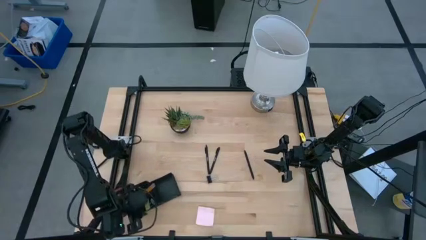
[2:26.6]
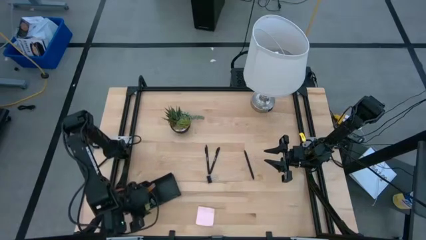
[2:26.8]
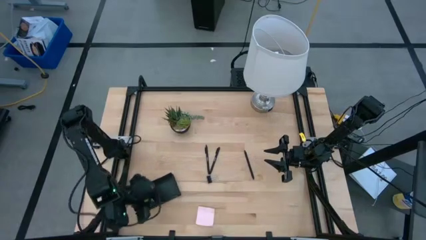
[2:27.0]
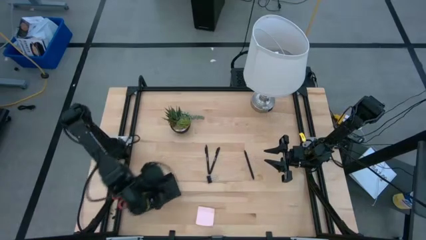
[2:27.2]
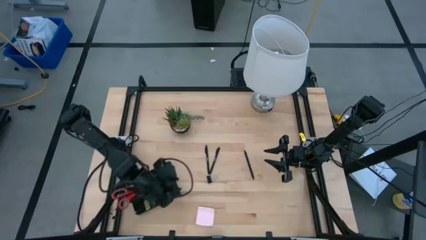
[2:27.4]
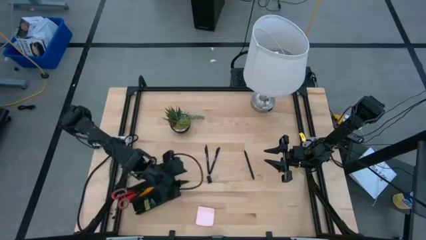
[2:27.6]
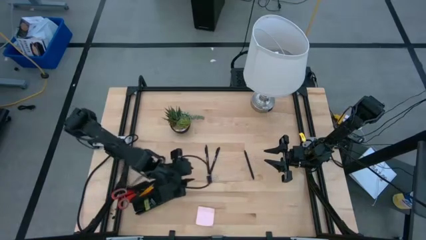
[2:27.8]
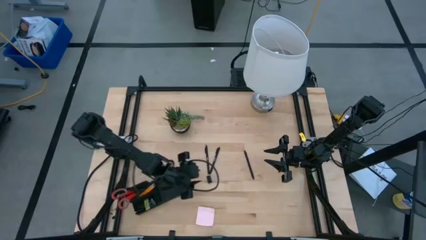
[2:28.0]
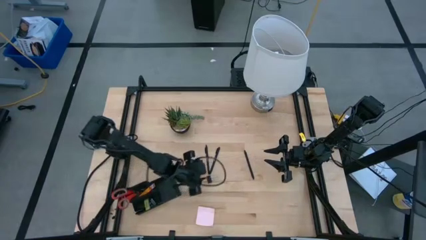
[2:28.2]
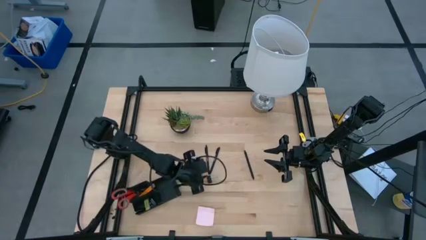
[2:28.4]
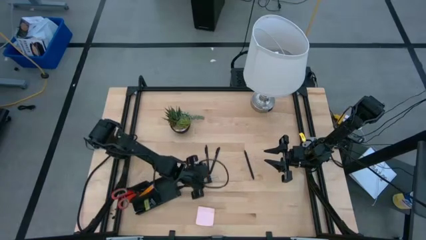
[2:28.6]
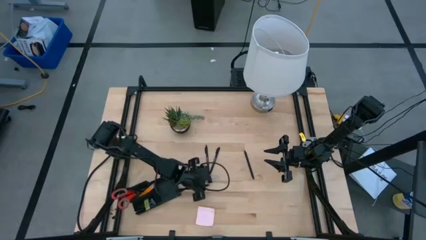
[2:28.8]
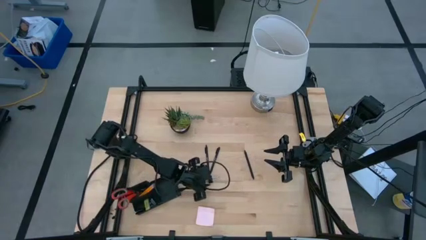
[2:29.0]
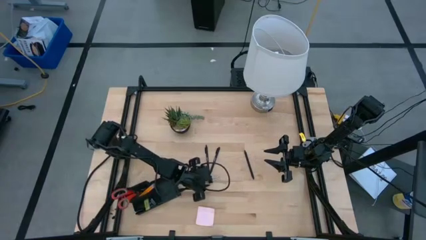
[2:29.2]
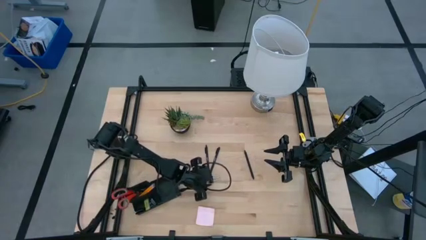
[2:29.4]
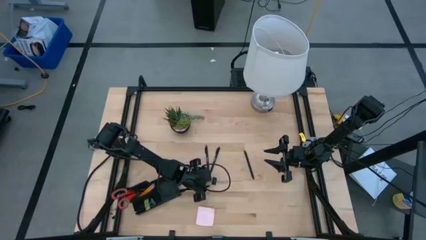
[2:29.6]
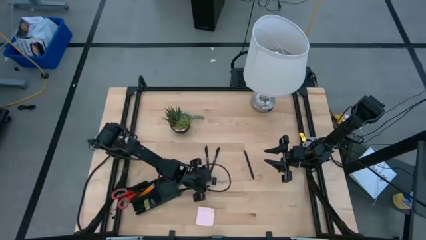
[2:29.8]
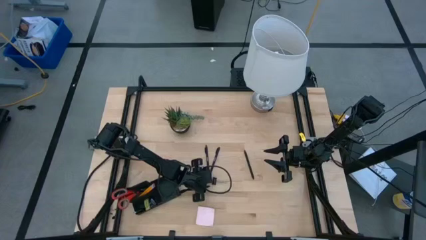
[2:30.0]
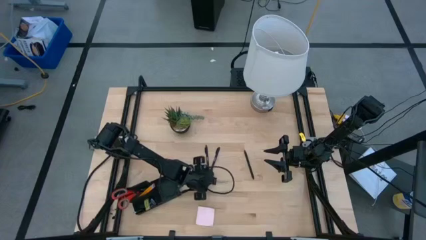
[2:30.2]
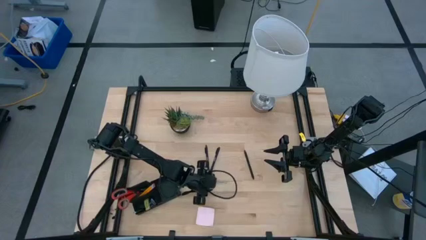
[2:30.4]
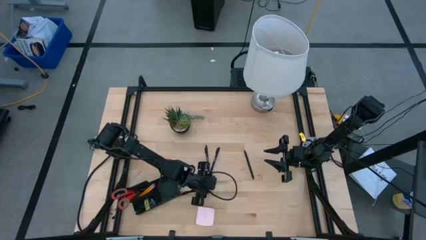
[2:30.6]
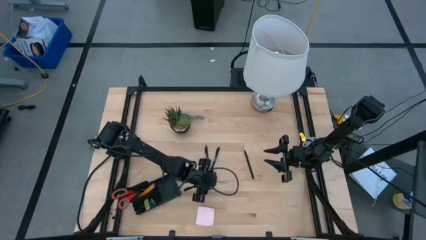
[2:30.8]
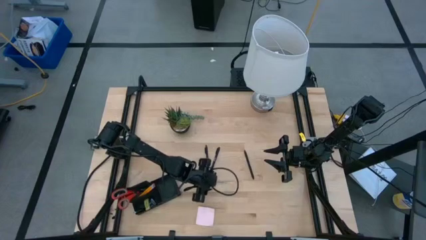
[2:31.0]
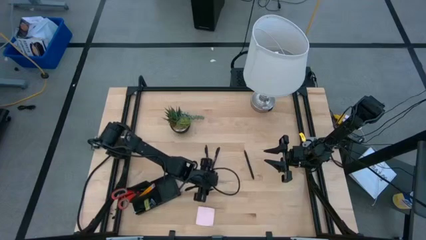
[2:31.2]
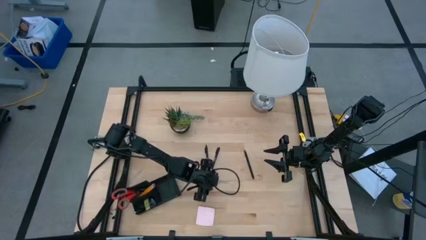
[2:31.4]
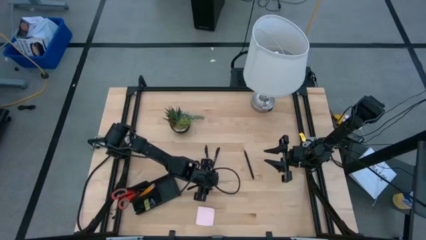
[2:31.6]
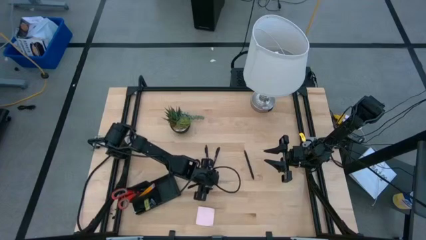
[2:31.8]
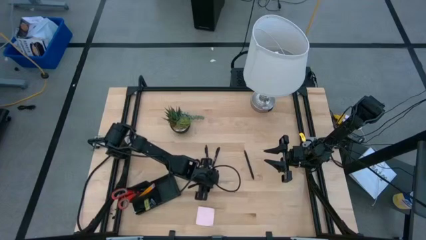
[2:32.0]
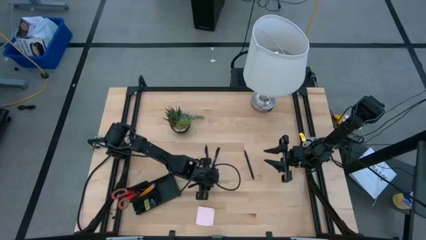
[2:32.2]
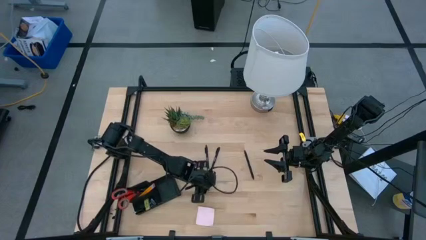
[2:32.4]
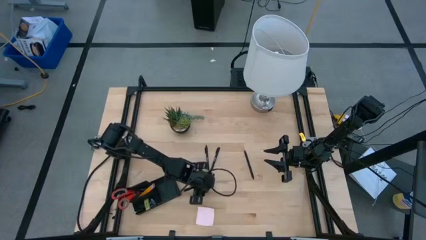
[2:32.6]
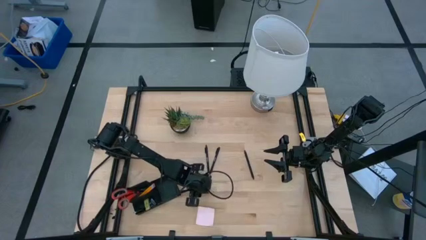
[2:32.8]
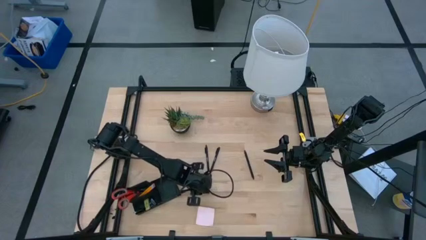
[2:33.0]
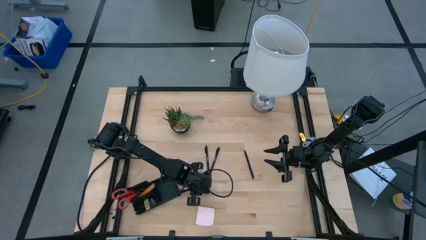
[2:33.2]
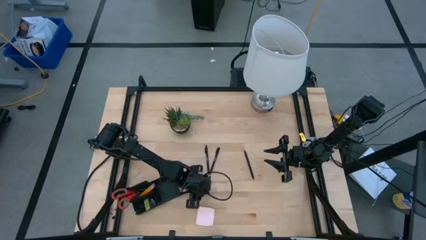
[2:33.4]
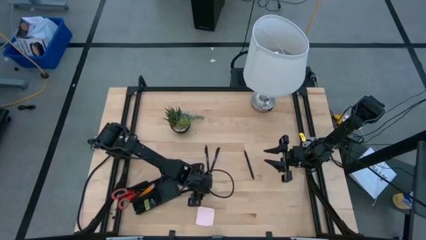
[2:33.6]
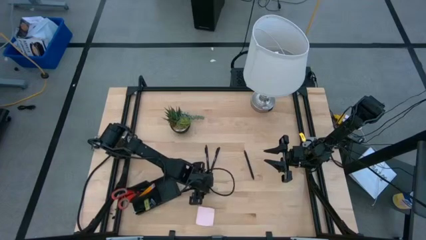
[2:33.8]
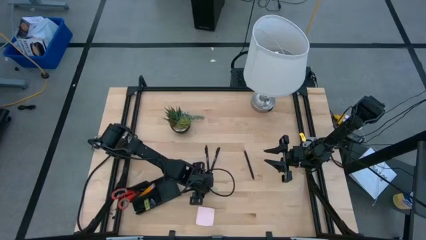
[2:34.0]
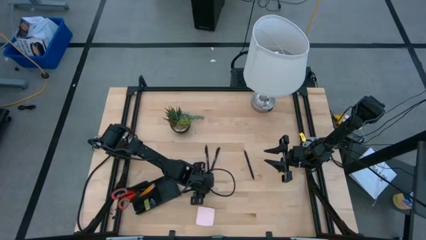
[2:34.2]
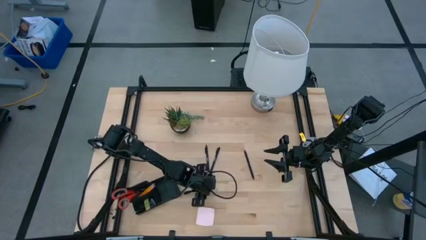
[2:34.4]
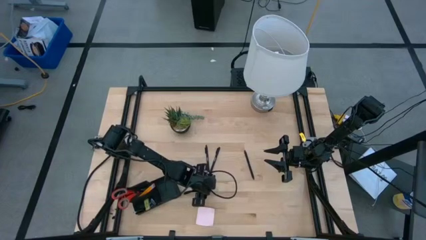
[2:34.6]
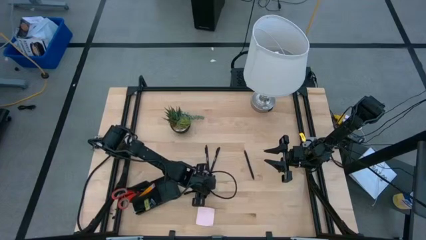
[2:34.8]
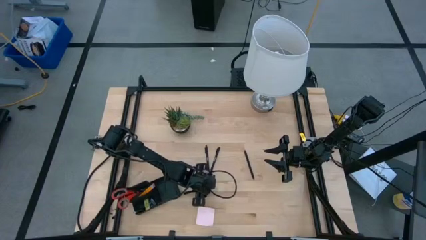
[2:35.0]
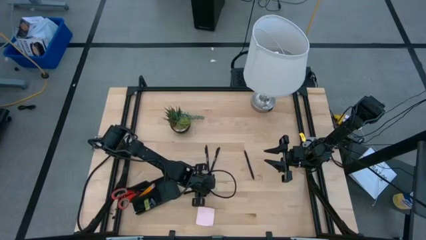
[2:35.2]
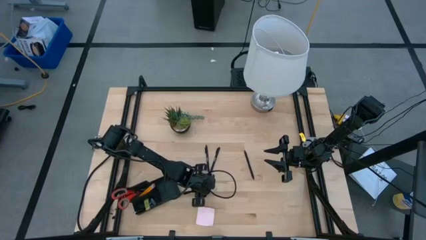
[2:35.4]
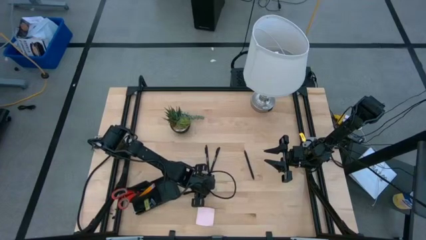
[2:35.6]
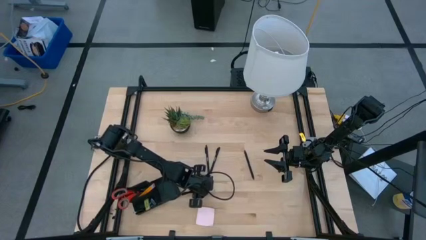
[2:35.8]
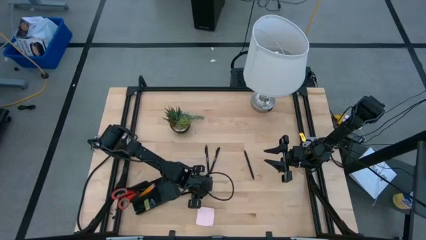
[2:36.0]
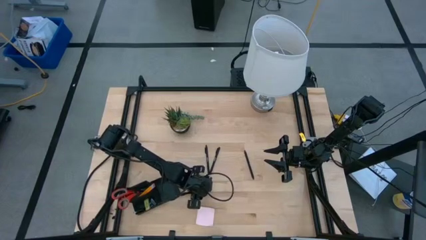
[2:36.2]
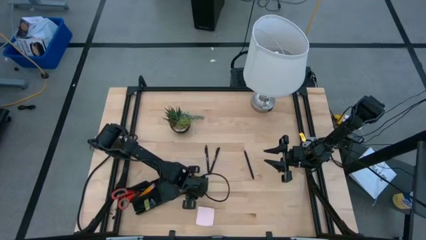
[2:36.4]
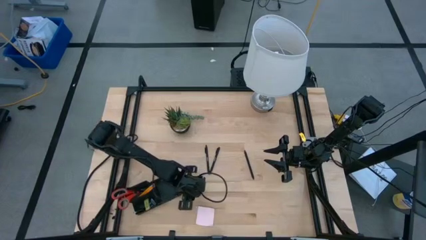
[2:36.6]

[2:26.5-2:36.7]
Task: Pick and place office supplies into organizer
Put the binder clip into the bottom left section of the desk organizer

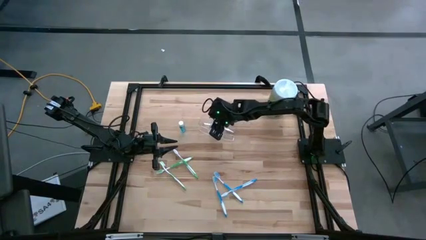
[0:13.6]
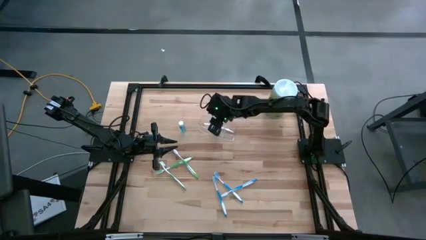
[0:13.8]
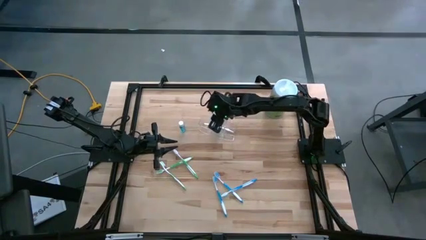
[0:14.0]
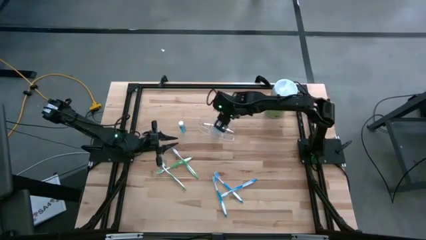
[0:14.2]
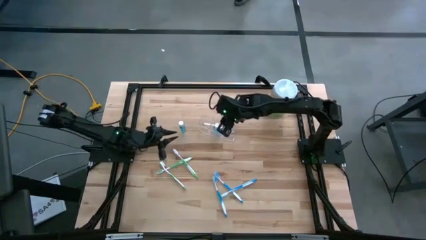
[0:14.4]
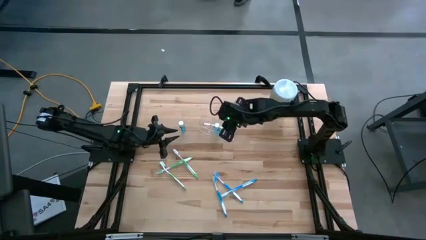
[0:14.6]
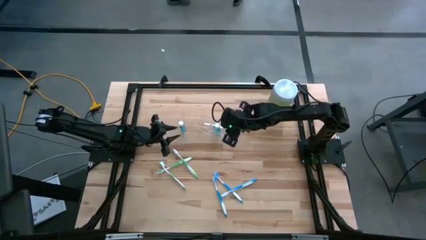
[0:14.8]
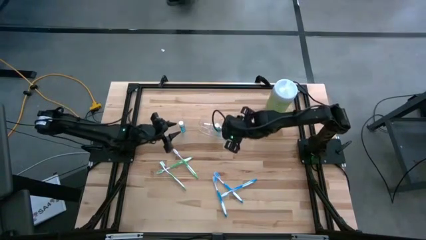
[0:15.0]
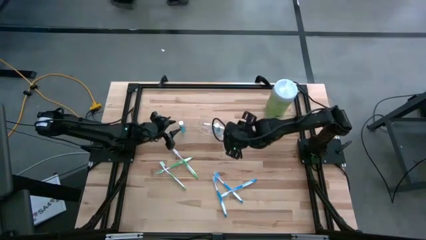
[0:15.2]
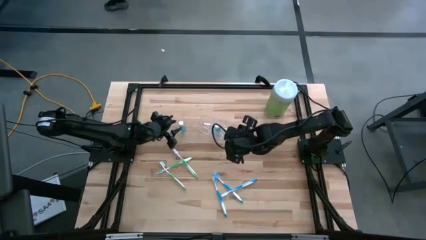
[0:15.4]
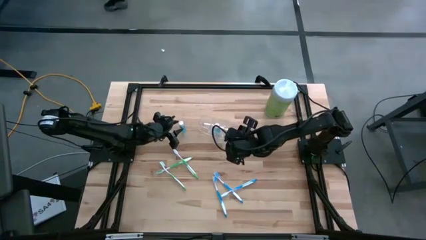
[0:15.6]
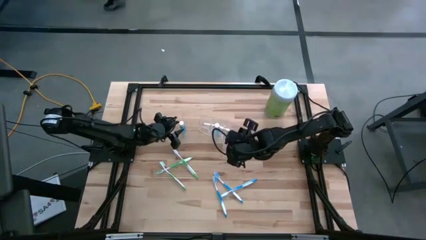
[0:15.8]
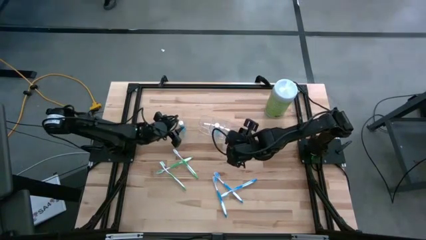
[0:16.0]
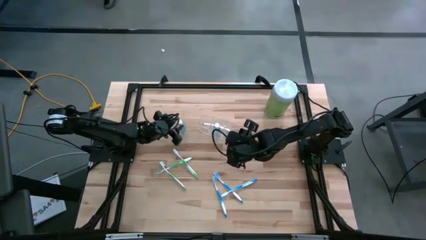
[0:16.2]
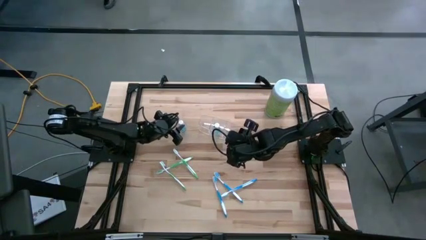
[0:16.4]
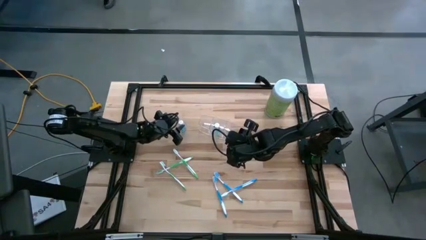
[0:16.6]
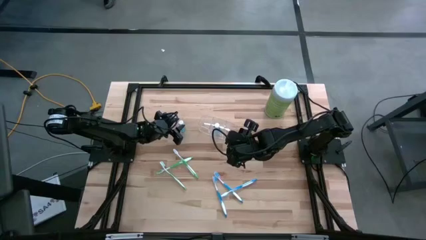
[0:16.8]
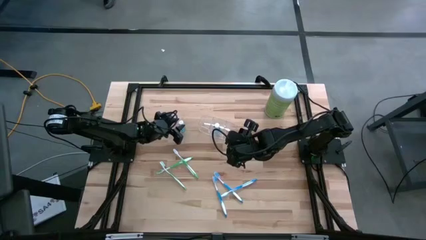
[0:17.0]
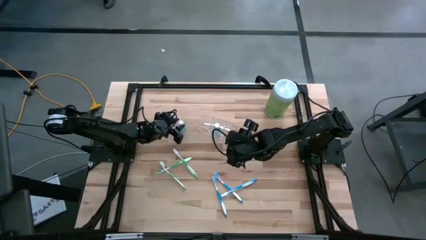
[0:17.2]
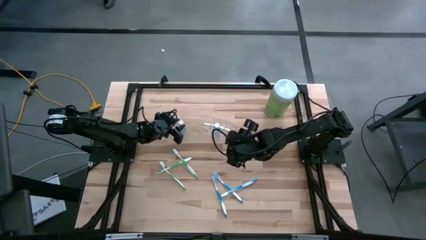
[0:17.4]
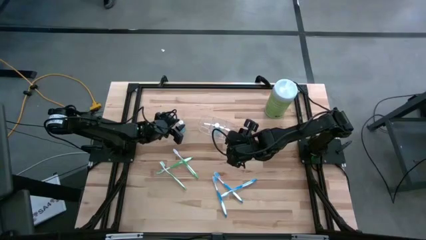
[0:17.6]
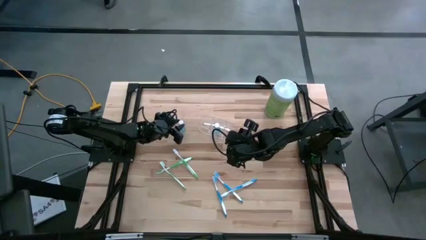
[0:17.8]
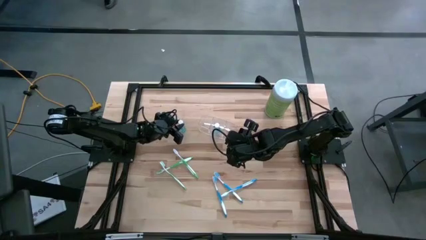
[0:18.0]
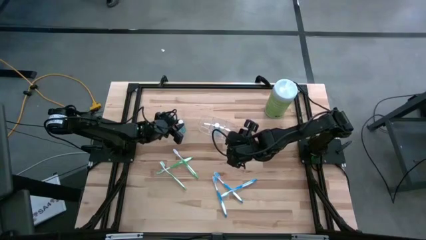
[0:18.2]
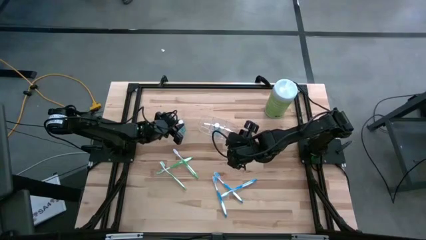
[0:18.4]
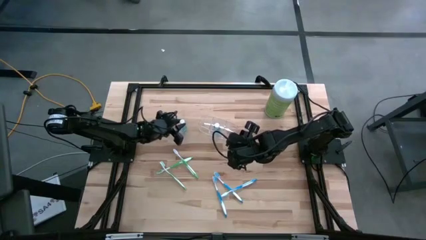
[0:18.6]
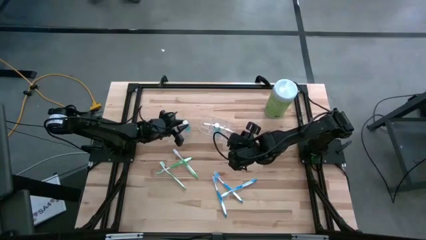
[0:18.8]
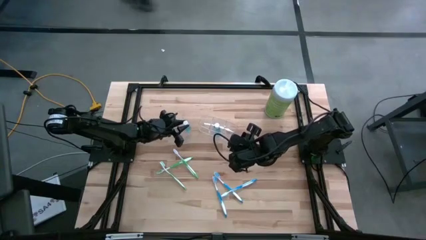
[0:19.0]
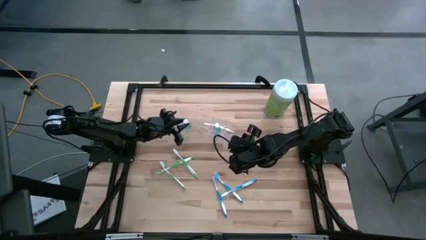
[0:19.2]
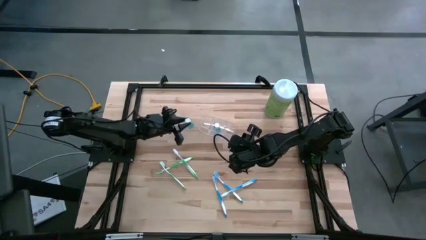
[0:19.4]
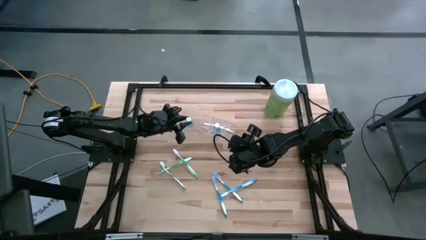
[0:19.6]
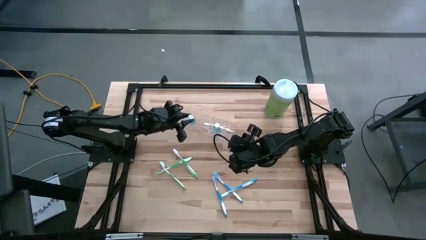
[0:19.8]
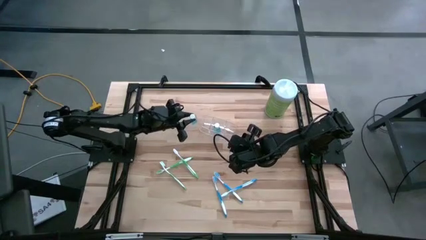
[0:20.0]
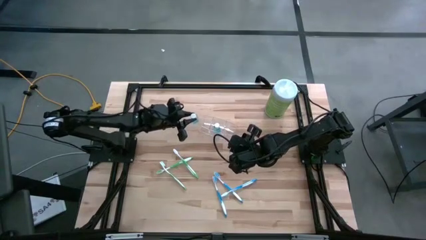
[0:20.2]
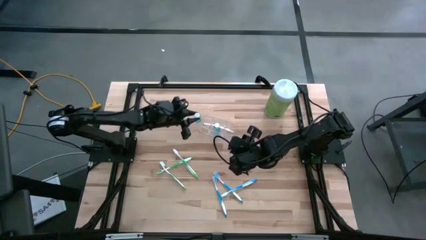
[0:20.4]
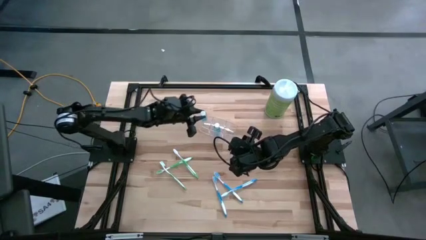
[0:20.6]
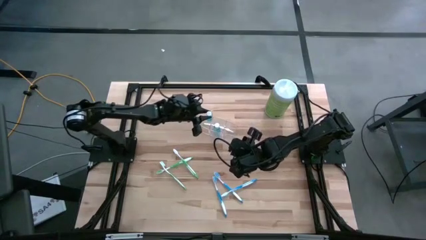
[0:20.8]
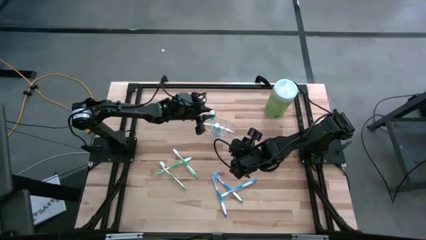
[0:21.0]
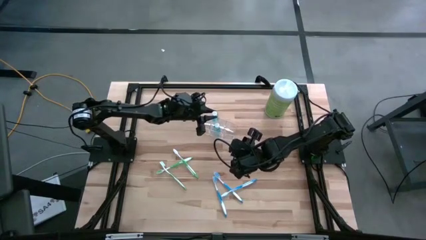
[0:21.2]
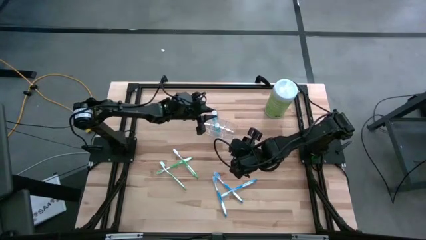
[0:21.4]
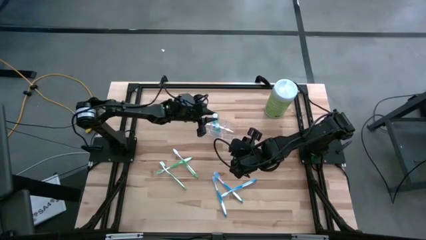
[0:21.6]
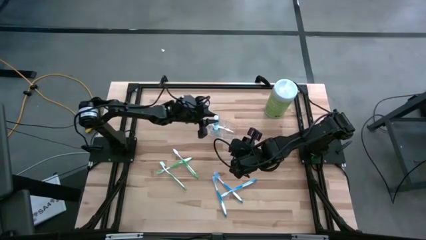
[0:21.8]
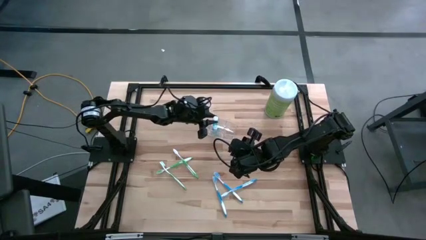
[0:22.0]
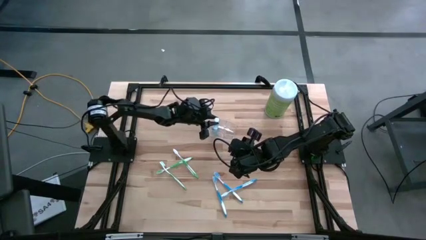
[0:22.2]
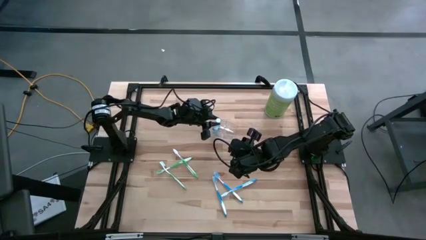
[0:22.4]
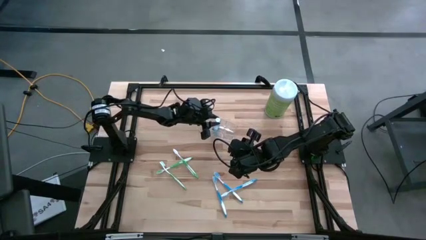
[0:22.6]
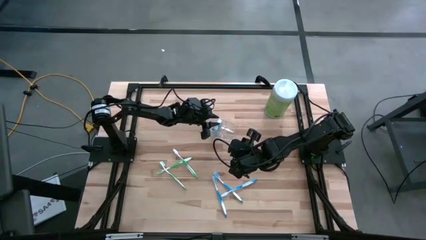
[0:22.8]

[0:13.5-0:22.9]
Task: Pick & Place toothbrushing station
Put the blue mouthwash into the transparent organizer
